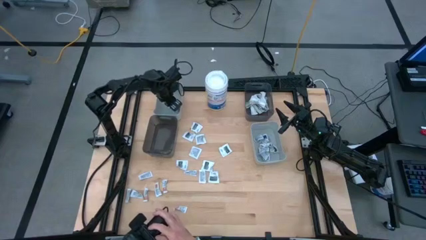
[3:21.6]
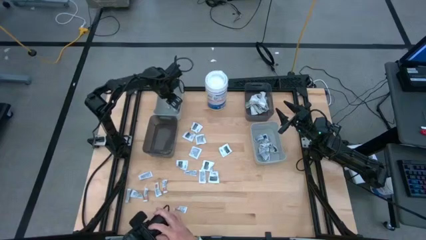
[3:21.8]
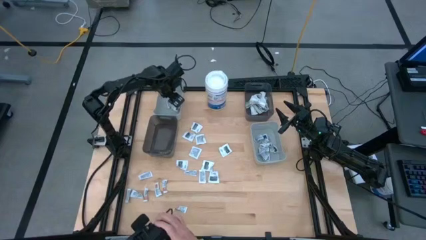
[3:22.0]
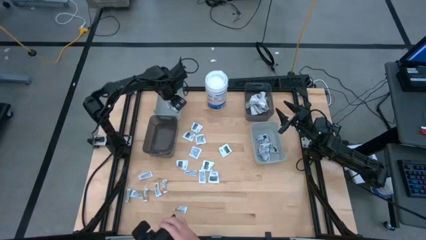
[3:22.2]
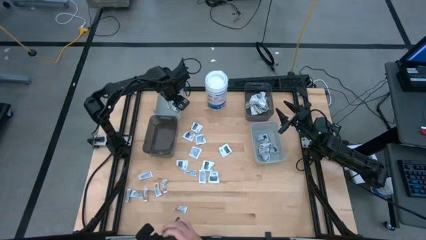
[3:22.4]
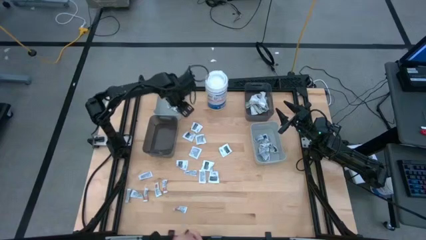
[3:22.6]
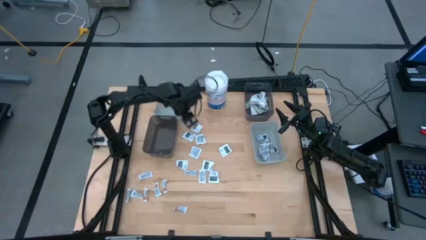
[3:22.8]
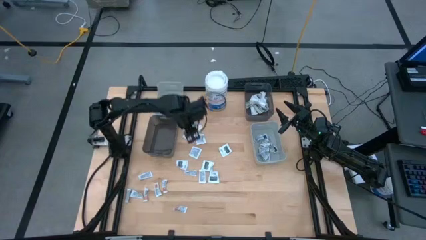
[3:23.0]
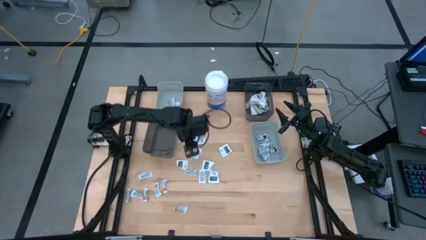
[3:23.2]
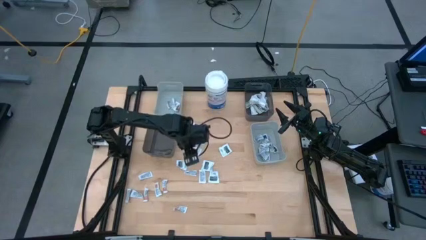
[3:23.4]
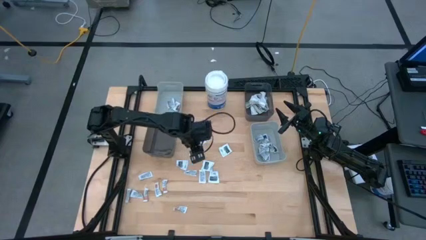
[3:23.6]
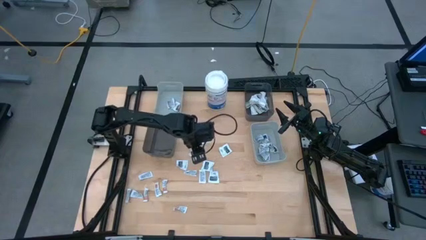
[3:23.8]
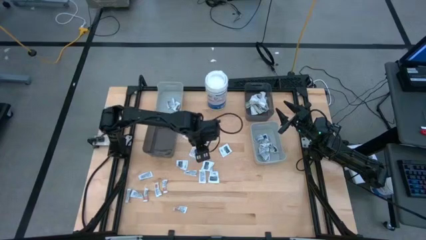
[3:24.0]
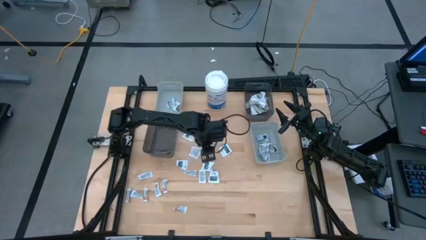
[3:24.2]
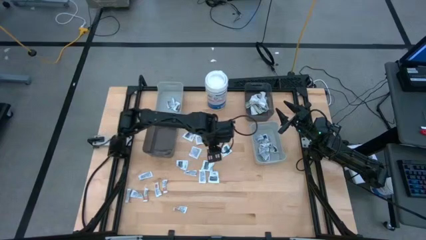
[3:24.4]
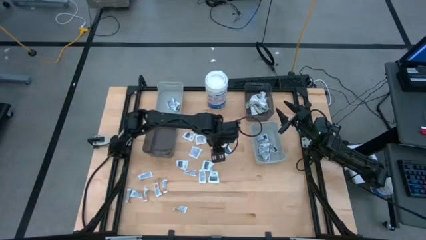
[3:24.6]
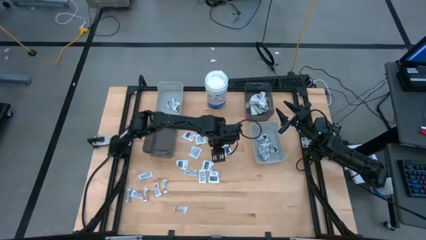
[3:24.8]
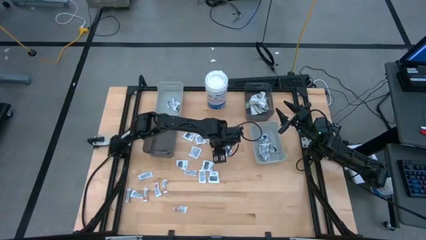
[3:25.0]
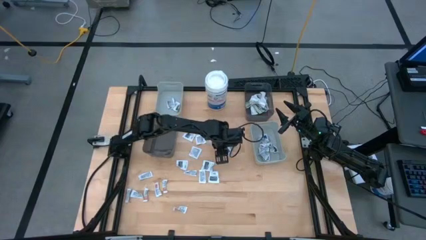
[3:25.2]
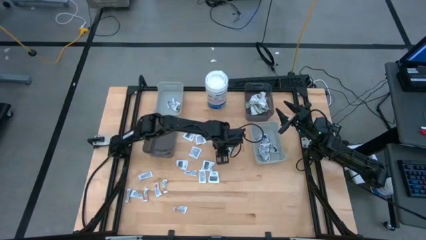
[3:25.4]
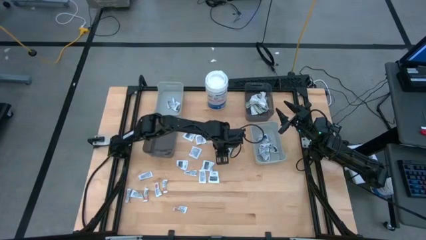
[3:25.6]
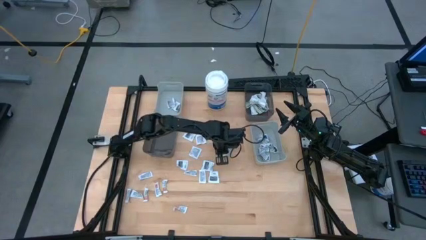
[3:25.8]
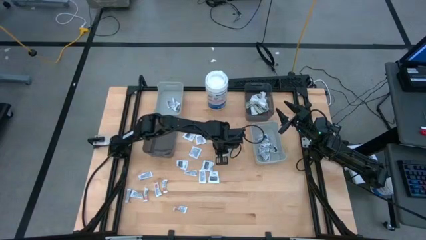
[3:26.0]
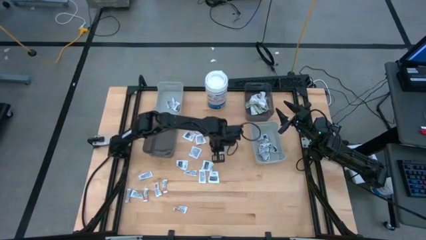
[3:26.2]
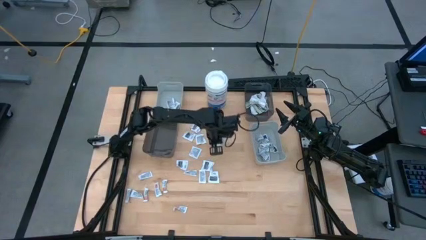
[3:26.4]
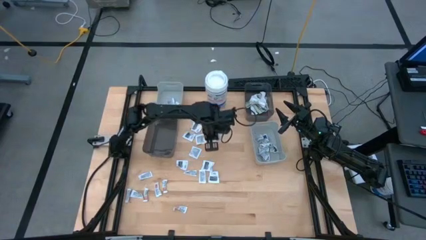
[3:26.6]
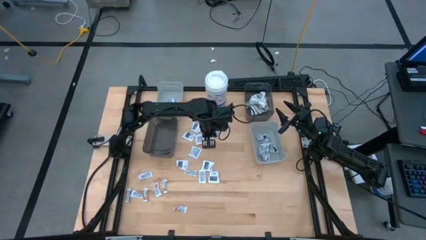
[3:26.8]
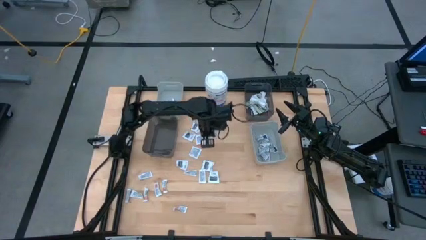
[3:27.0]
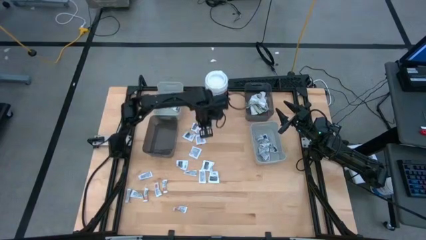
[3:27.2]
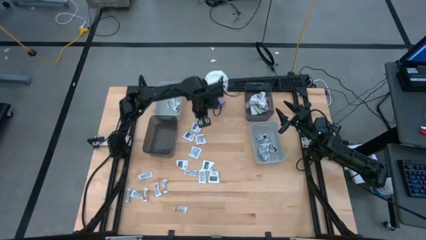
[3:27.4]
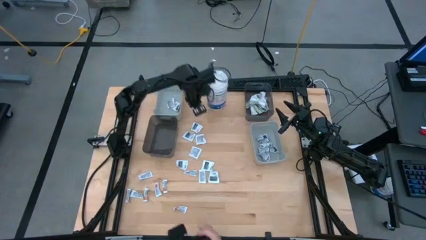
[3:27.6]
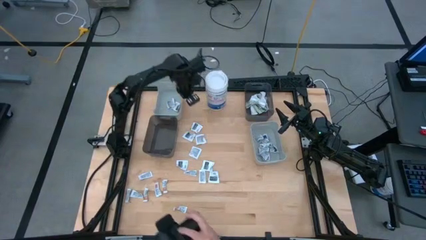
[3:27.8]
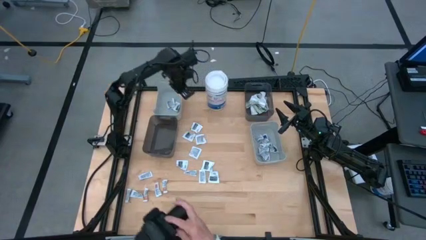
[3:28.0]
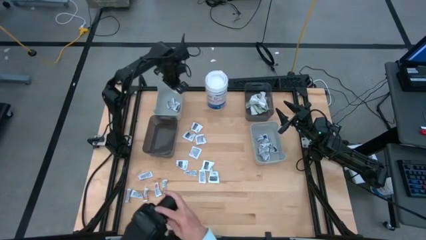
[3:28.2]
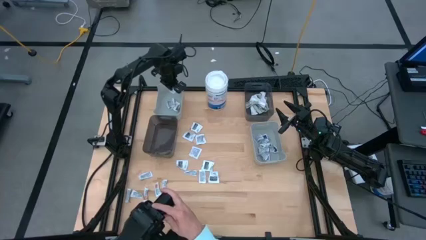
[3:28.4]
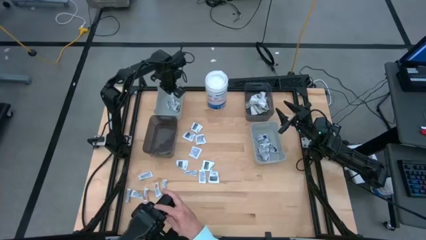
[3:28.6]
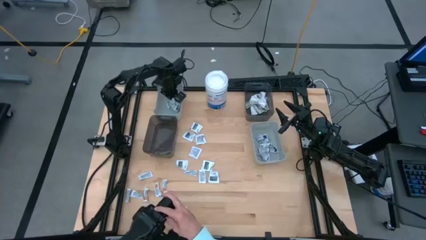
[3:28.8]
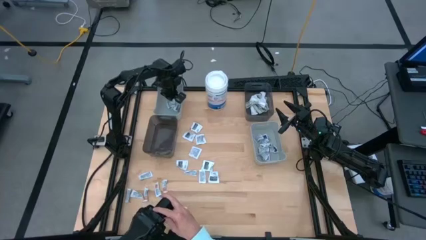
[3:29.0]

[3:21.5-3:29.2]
Task: Pick & Place First Aid Supplies
Put the gray towelette pack into the left gray bin

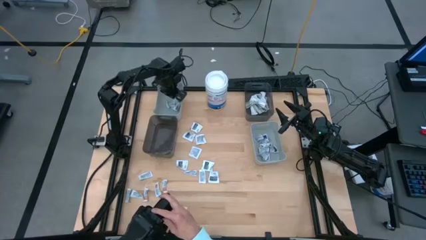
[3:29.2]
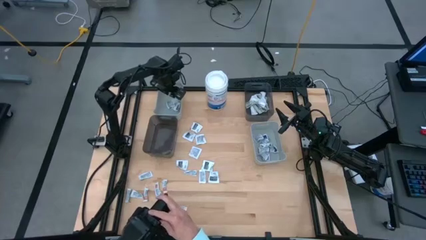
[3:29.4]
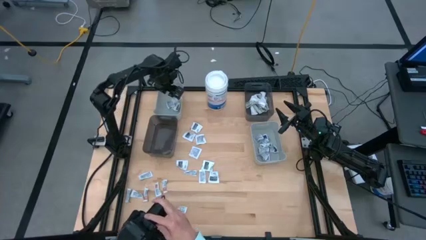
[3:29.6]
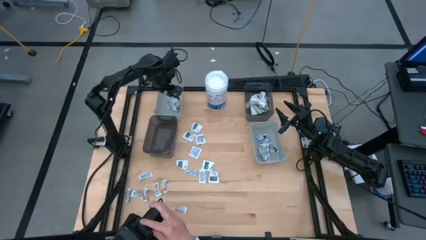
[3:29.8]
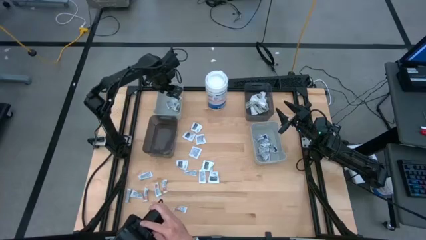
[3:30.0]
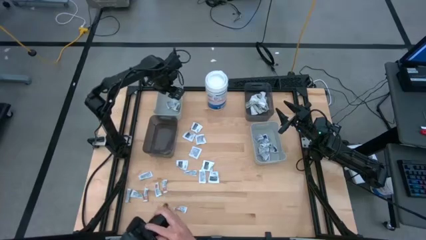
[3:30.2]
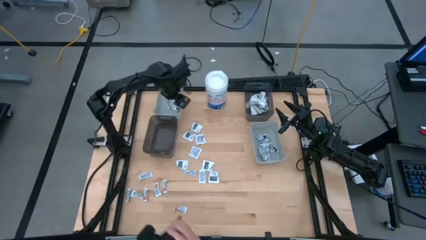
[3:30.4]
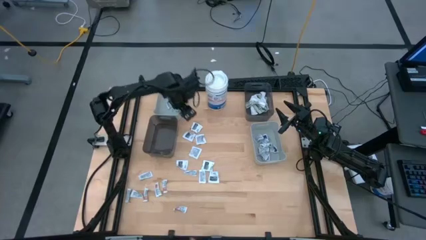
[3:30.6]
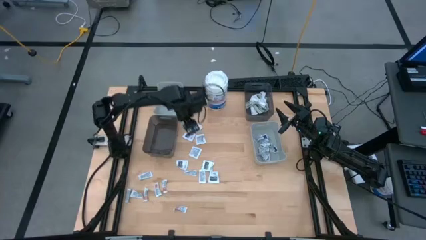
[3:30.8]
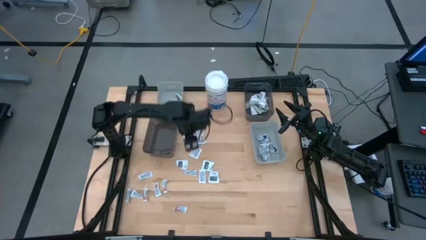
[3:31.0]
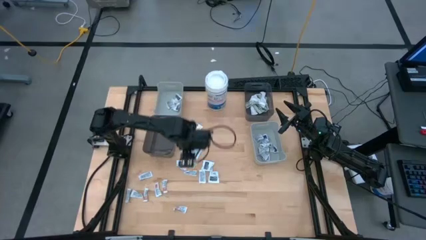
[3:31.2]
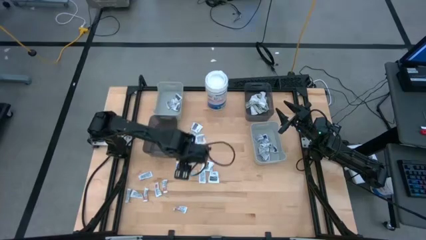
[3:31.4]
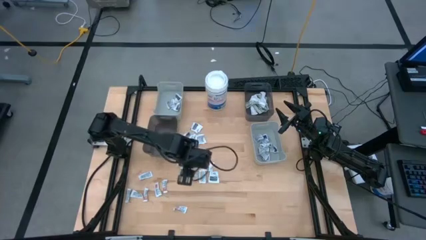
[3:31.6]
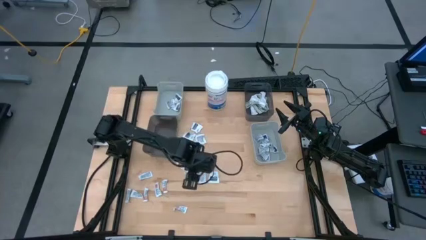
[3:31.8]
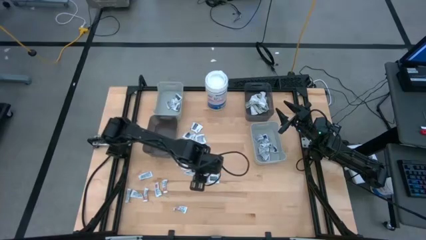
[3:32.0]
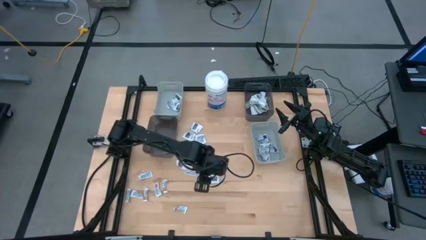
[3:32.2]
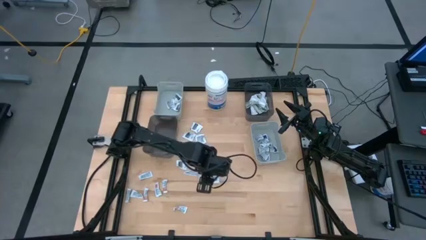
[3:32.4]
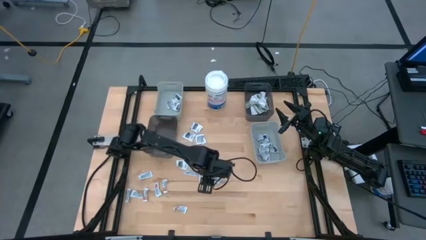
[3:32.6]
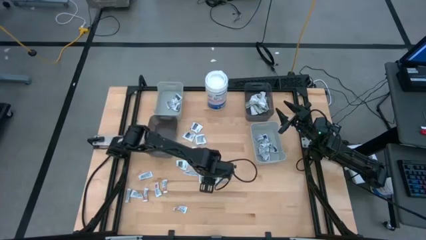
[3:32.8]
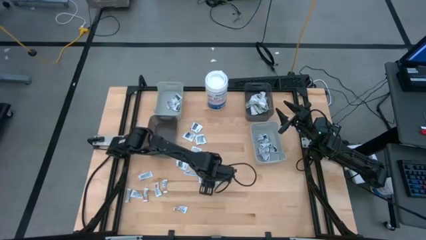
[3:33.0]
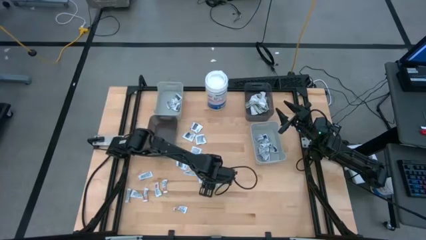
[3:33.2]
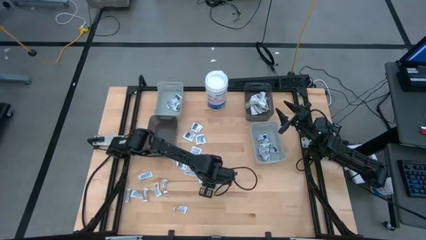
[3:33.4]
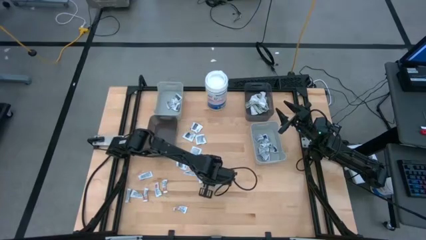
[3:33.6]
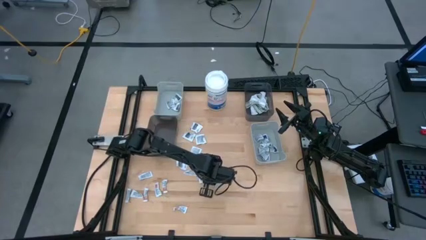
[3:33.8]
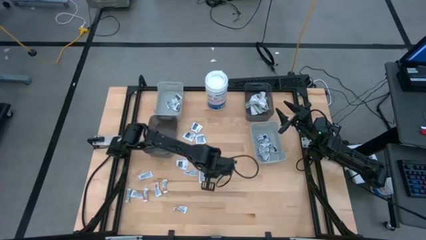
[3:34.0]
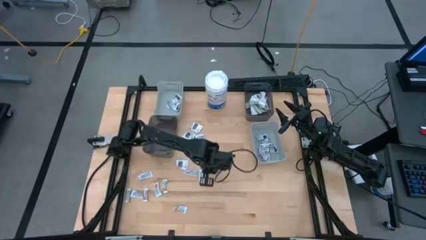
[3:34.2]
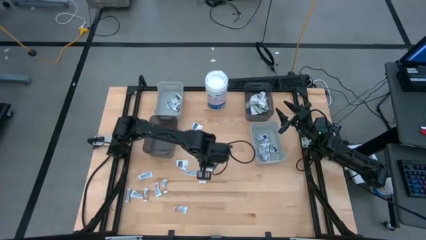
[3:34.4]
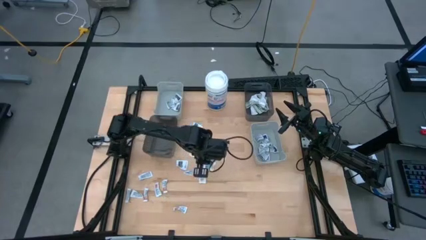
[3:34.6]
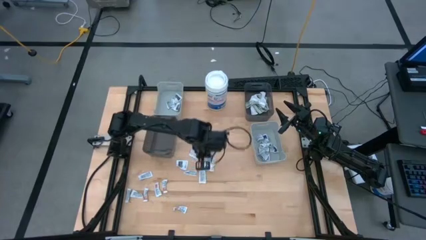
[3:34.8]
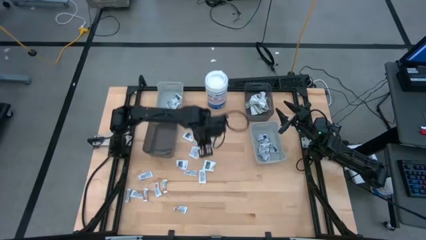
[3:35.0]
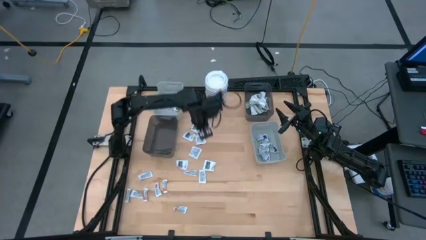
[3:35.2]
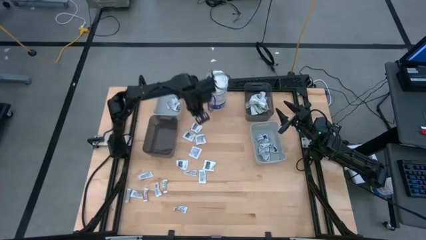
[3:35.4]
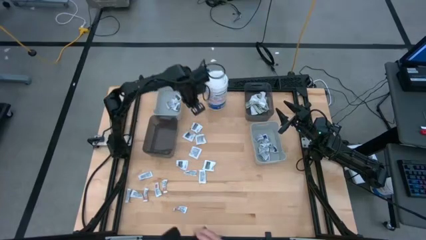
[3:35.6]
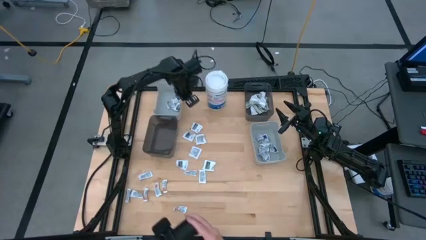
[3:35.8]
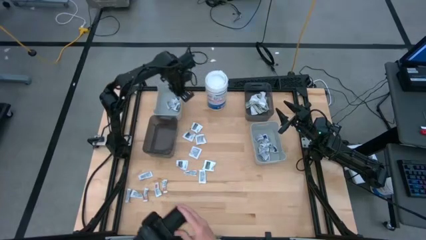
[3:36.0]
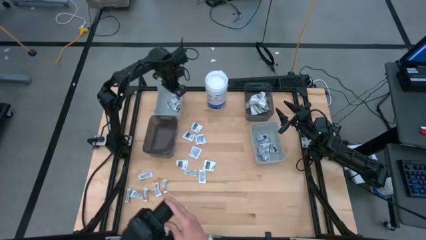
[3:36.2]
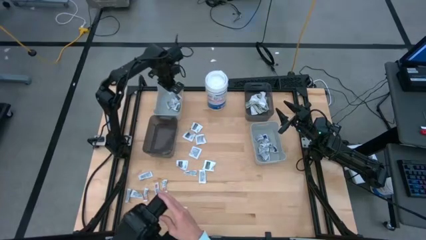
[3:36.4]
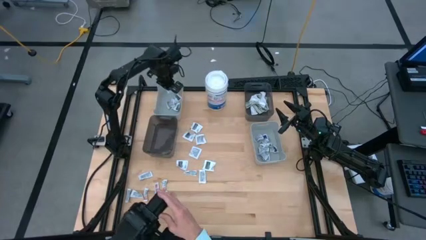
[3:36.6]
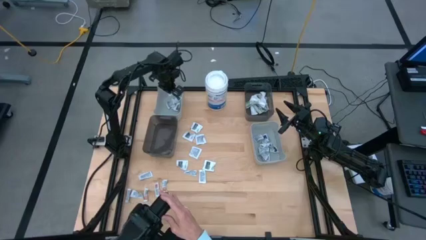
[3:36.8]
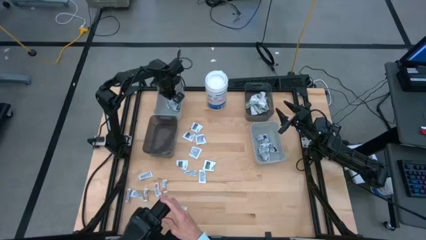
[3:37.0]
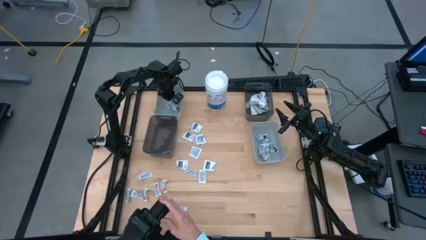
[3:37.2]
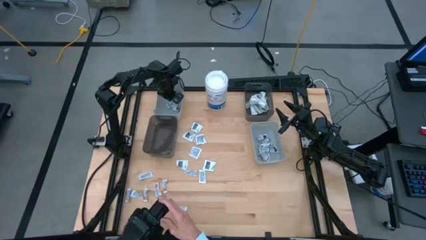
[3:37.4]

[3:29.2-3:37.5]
Put the gray towelette pack into the left gray bin
